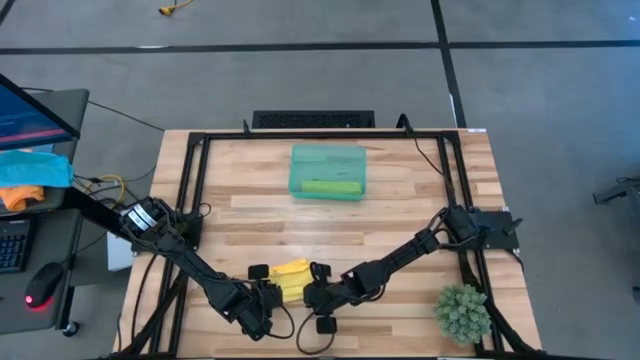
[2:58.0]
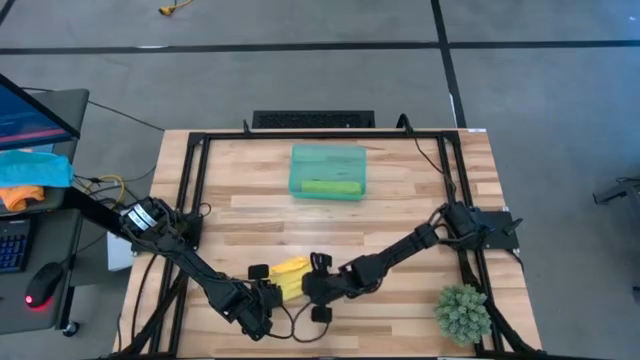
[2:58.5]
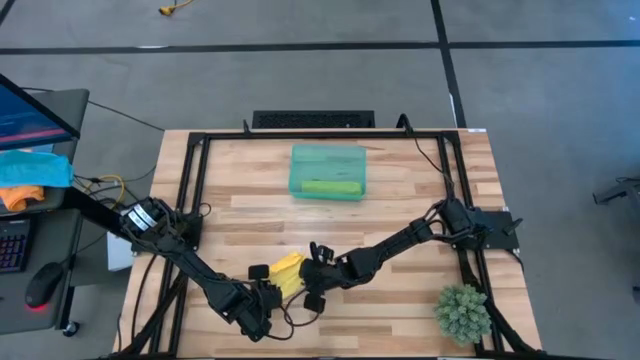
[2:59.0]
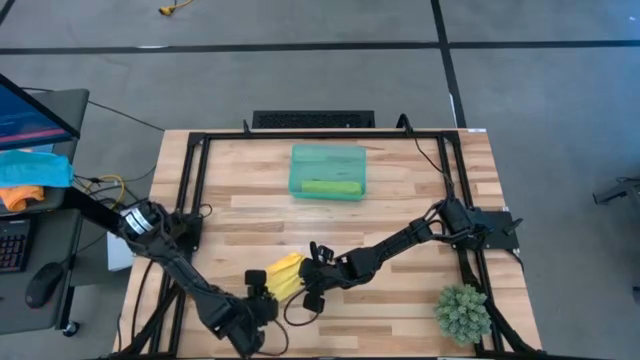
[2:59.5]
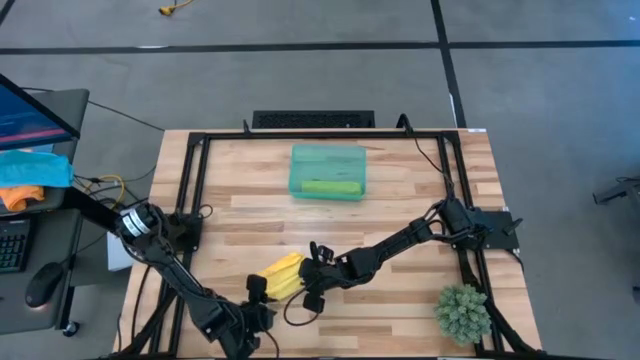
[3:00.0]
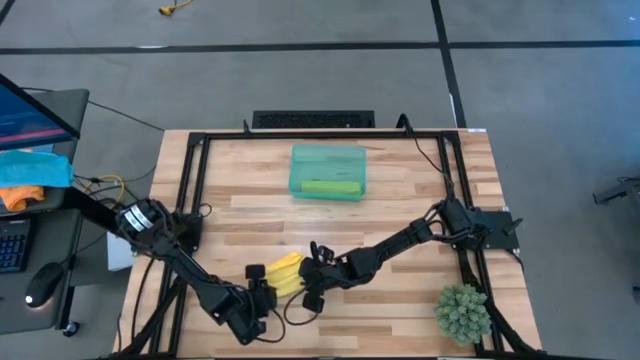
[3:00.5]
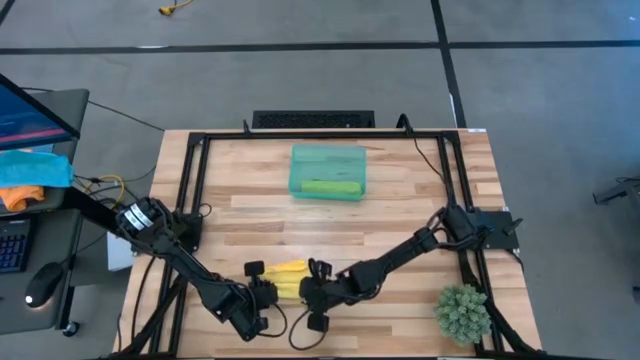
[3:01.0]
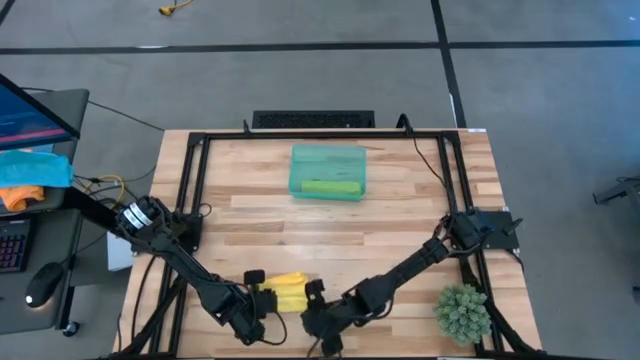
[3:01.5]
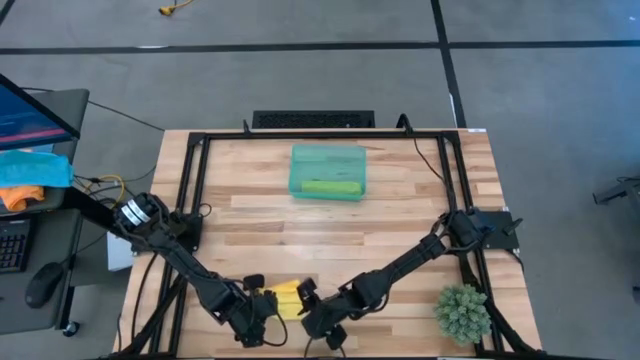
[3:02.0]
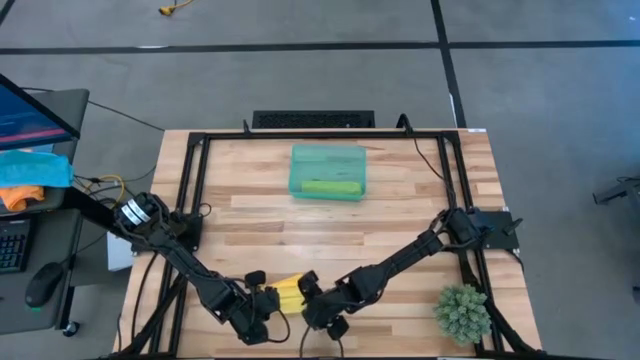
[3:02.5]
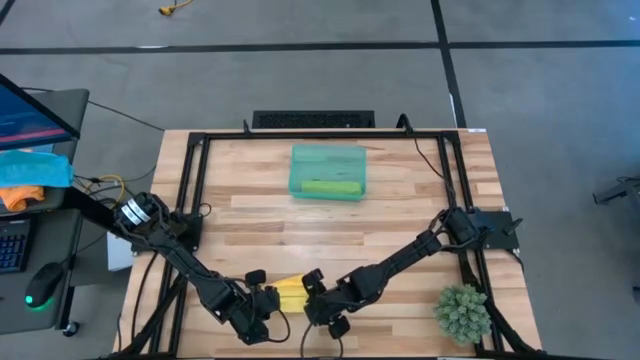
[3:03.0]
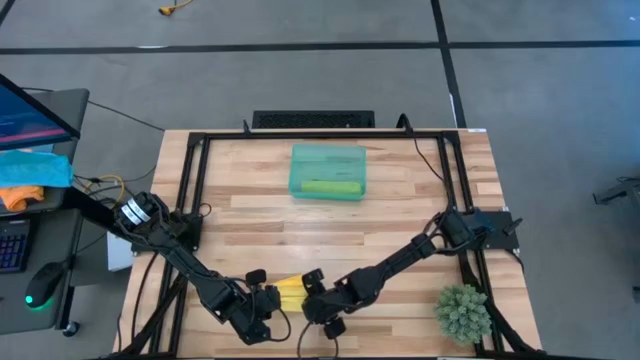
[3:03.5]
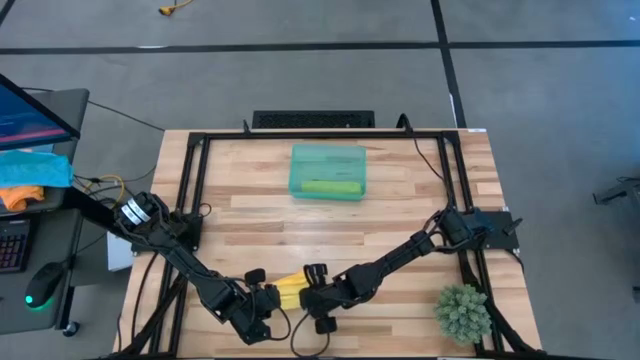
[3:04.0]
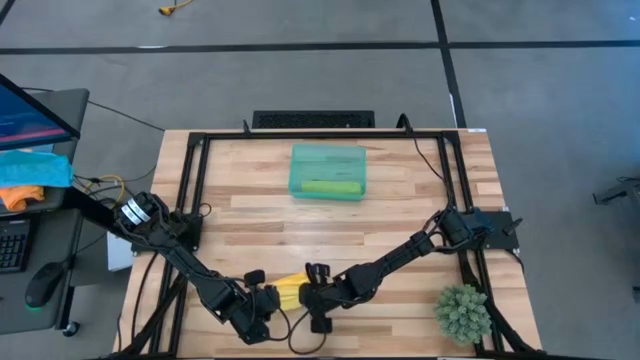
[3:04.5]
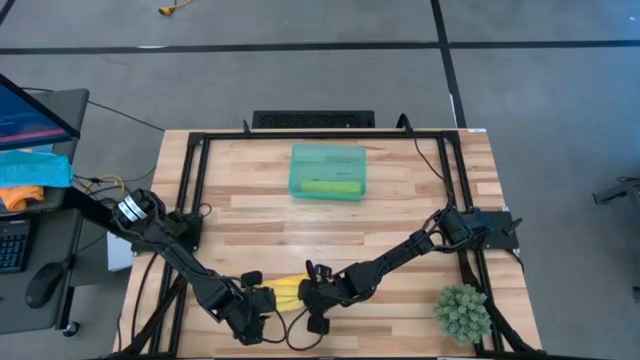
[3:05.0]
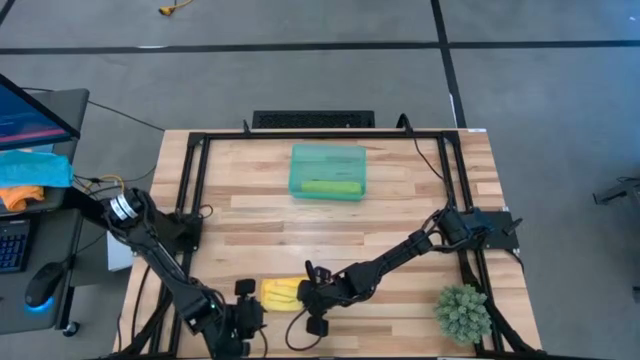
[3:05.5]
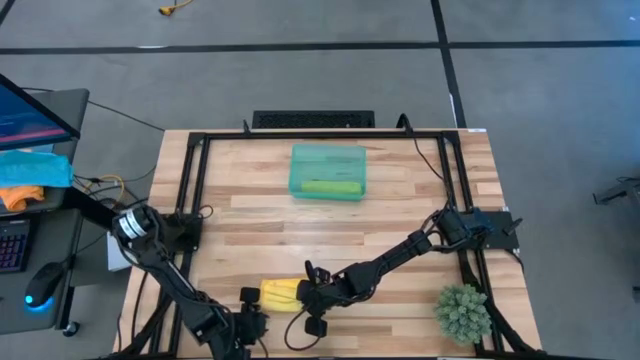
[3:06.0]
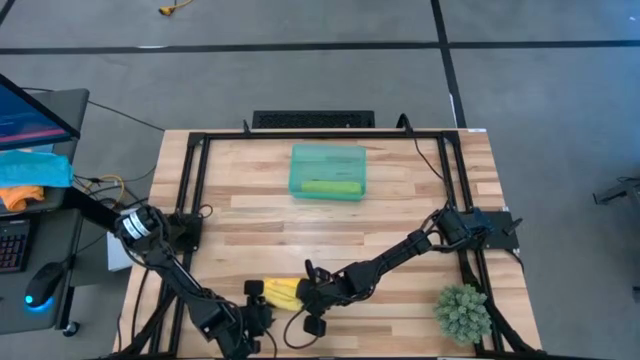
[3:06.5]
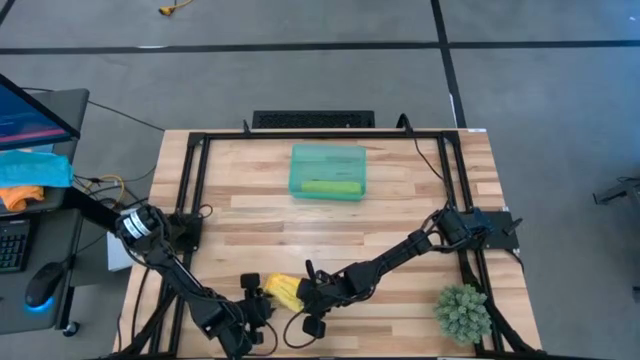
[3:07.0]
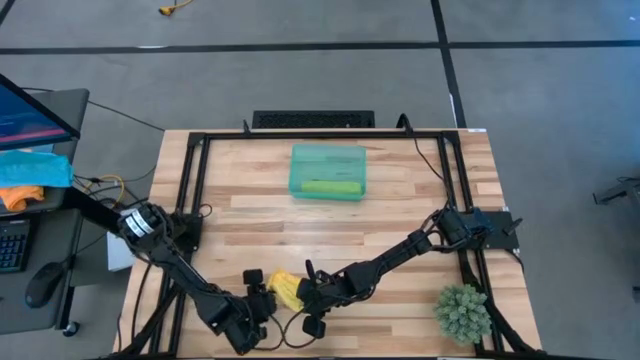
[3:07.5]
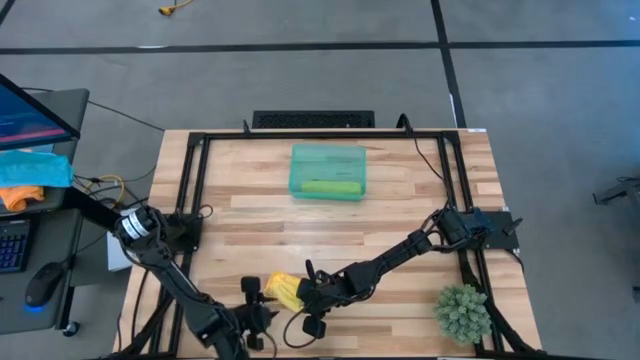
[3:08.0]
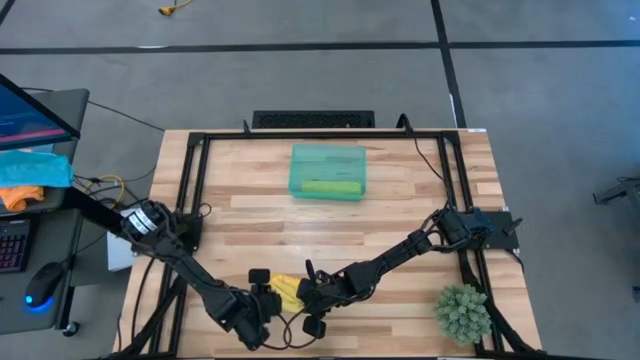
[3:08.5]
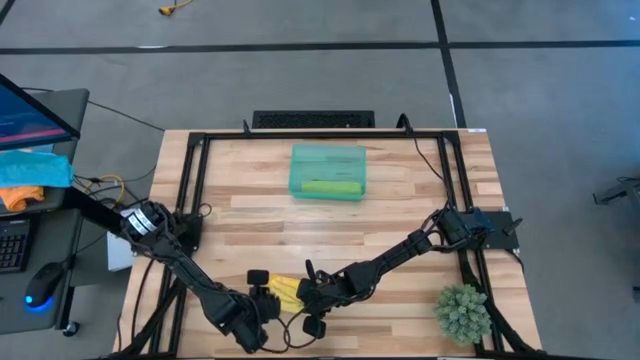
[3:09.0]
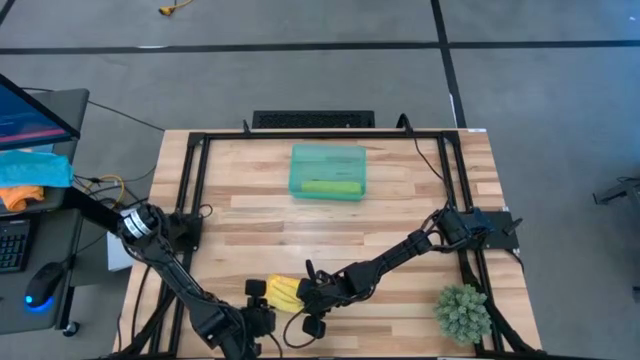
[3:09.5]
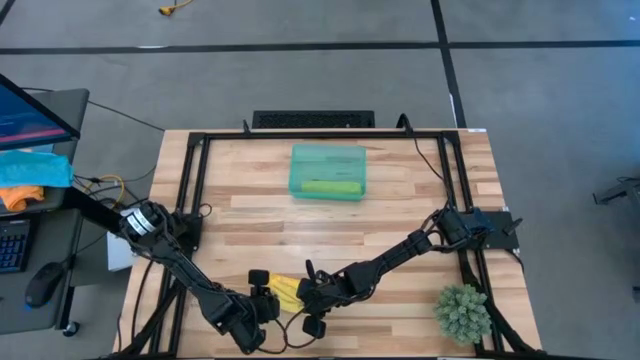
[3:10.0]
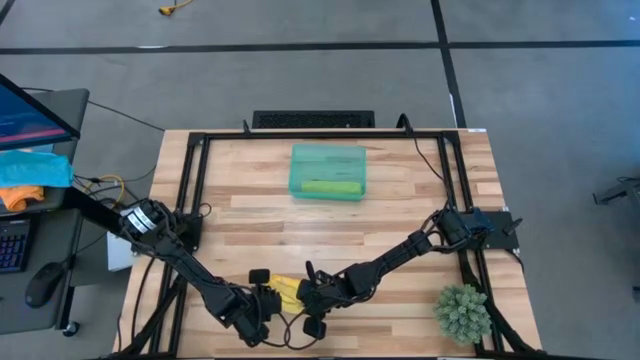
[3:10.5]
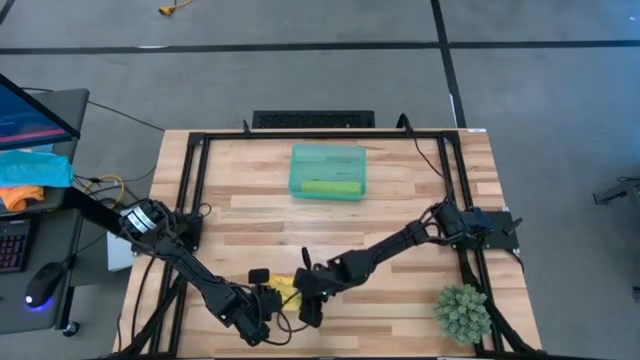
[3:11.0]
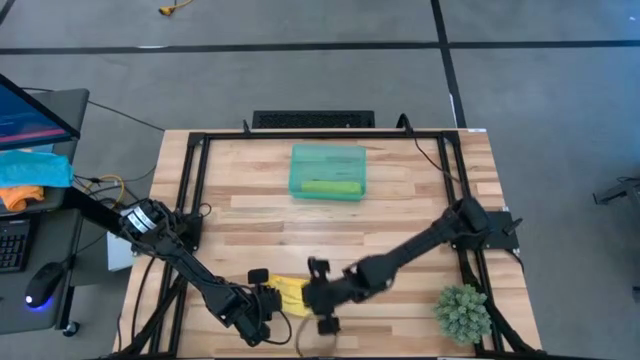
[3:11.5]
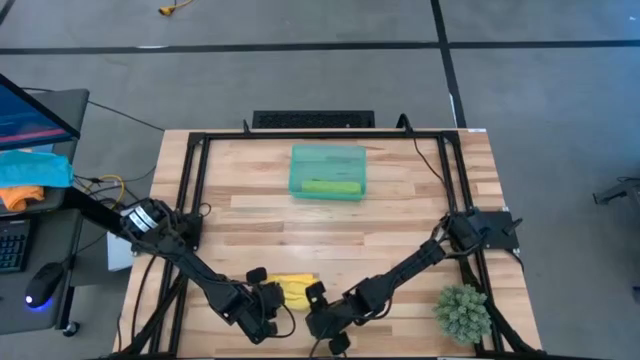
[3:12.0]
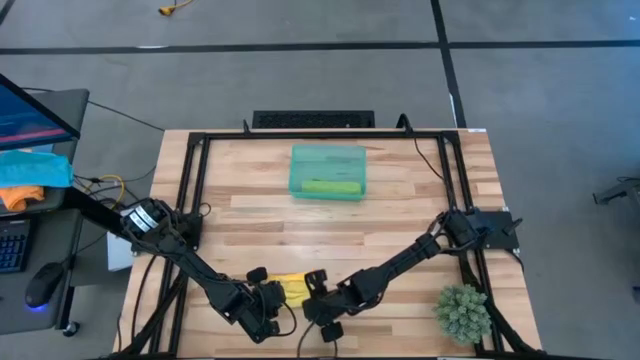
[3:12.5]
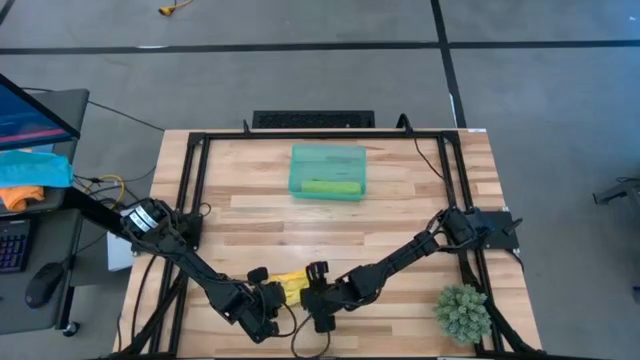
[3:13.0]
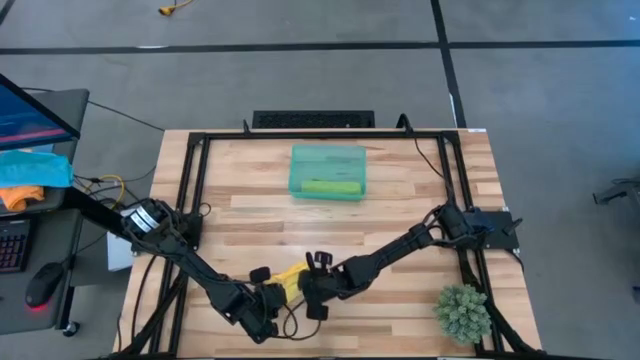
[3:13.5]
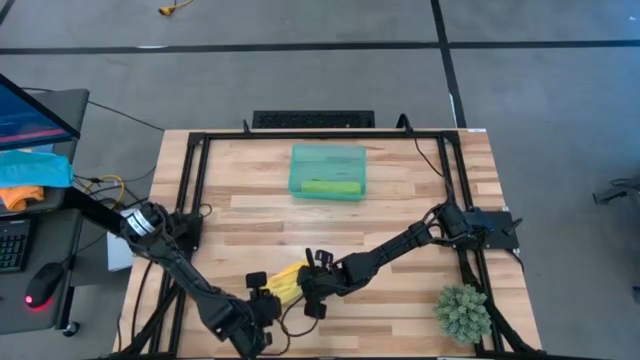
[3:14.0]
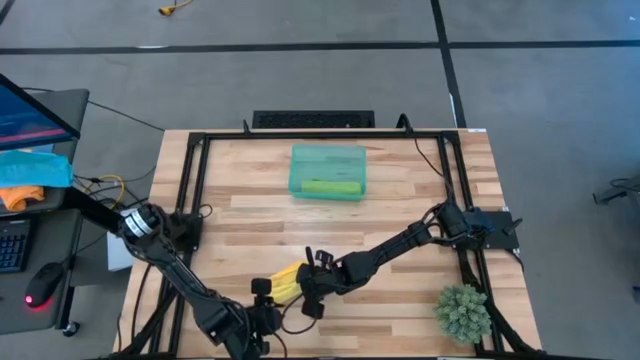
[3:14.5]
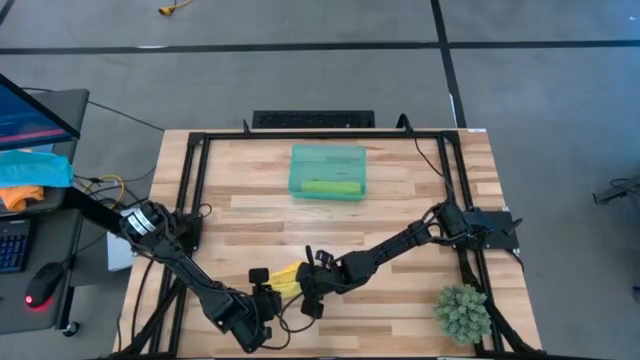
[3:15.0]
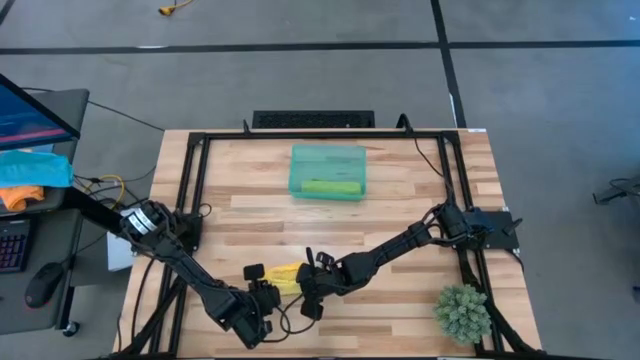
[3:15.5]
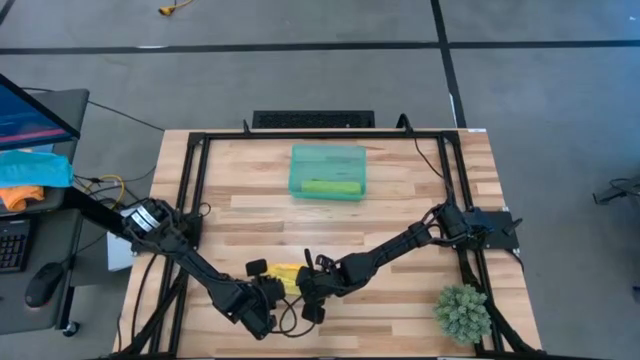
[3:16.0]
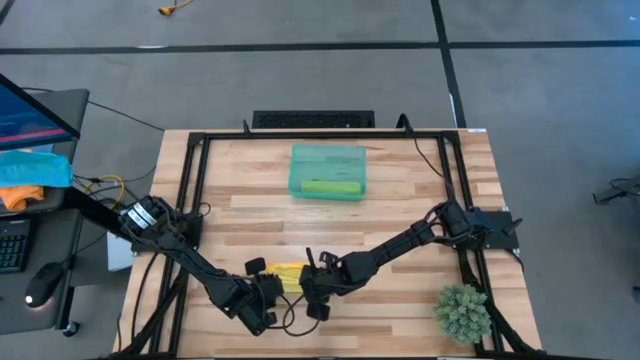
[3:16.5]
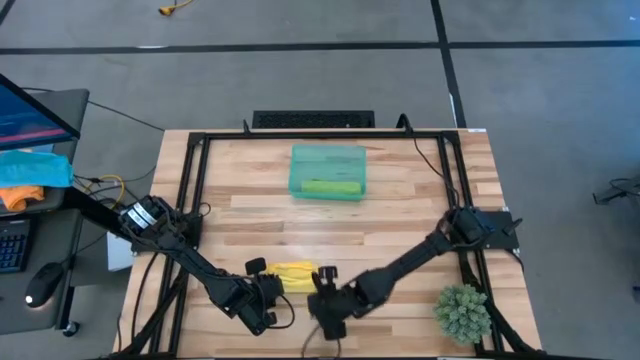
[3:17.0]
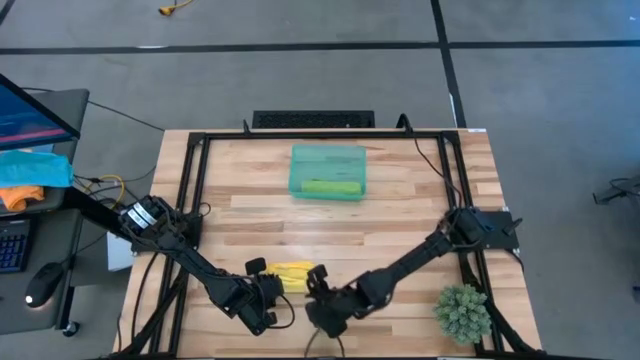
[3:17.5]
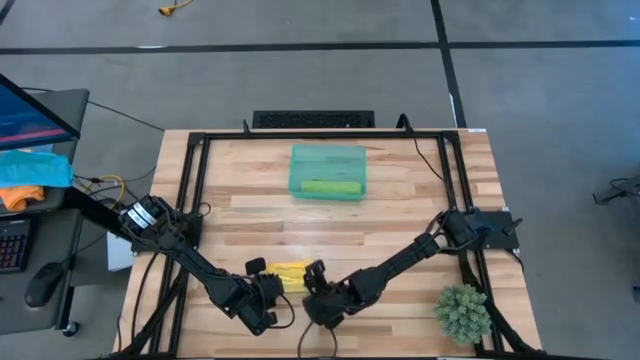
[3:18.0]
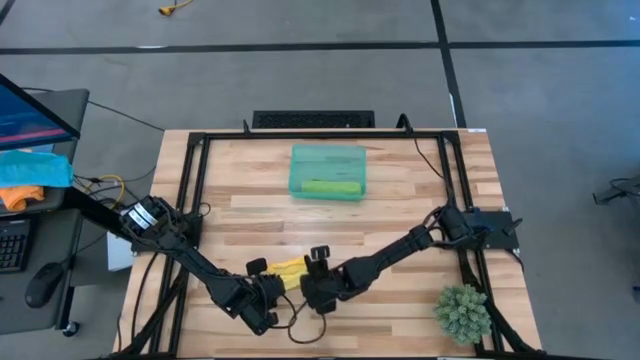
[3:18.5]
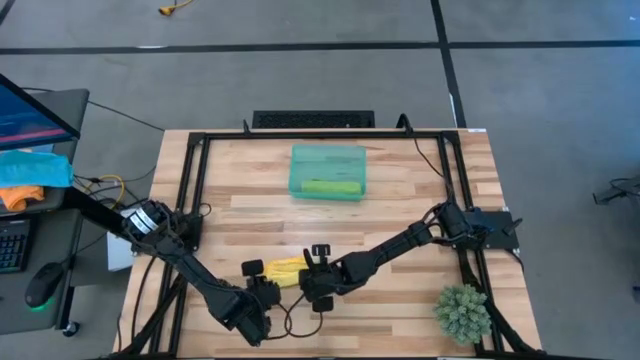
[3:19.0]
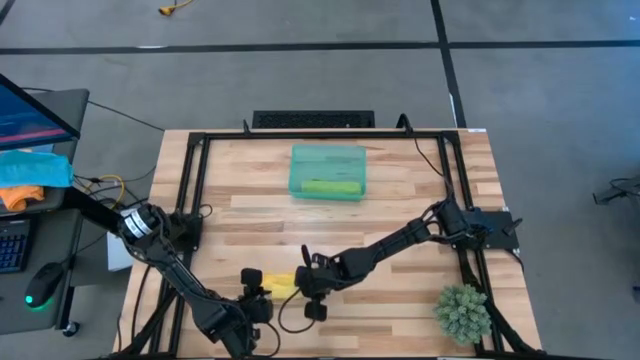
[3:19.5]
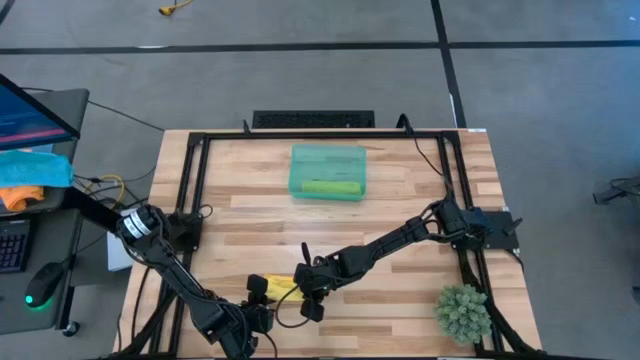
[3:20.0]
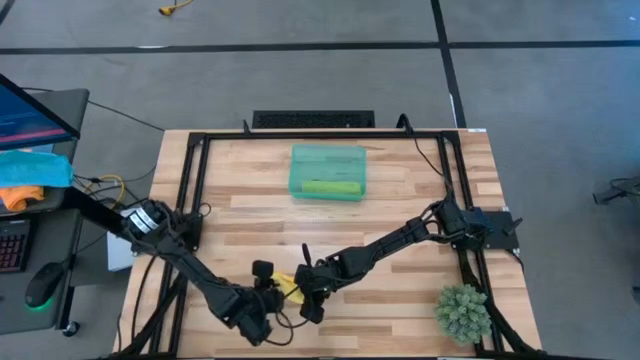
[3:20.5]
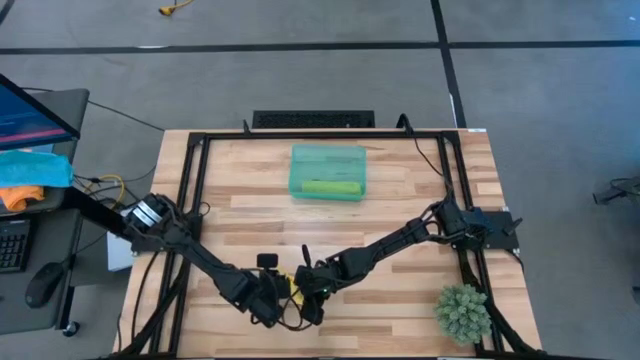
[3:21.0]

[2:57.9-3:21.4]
Task: Roll microfiber towels into tight, uniform cylinder then place into a basket
Roll the folded yellow microfiber towel
